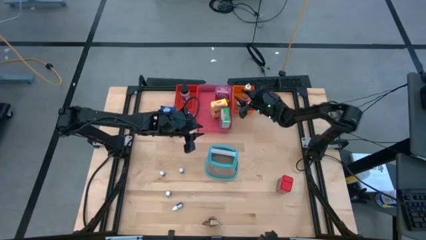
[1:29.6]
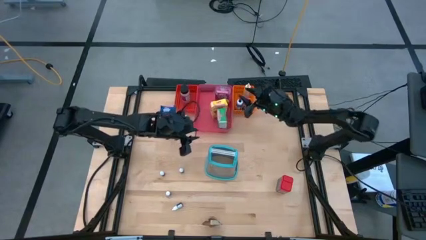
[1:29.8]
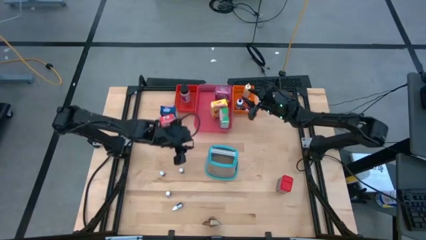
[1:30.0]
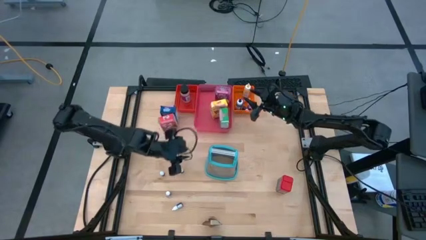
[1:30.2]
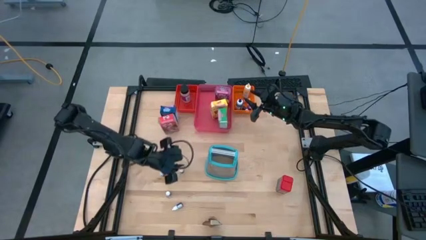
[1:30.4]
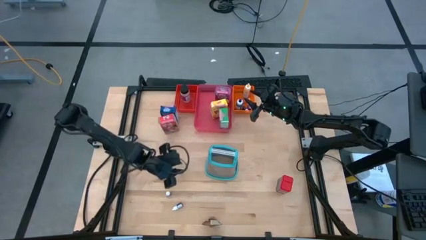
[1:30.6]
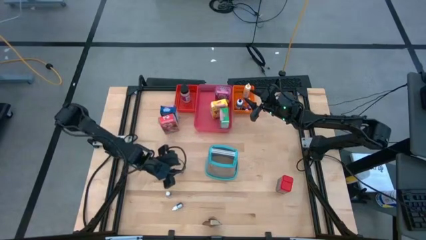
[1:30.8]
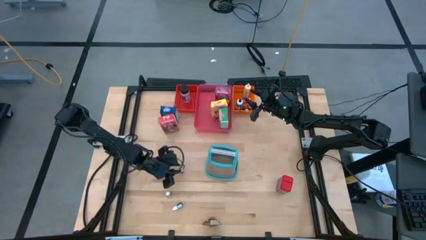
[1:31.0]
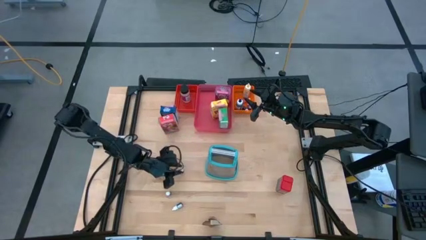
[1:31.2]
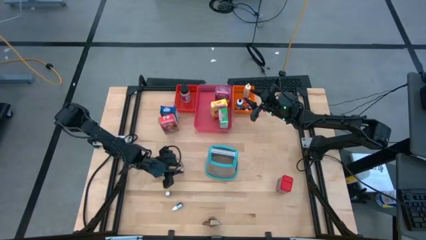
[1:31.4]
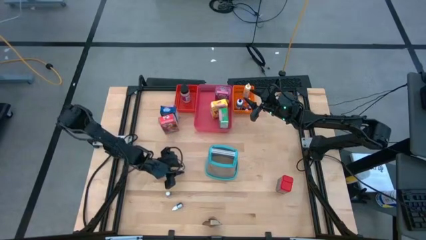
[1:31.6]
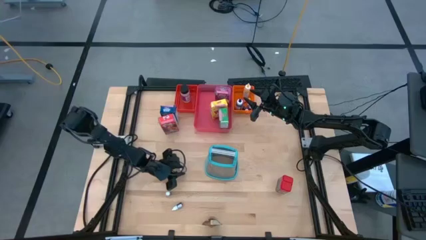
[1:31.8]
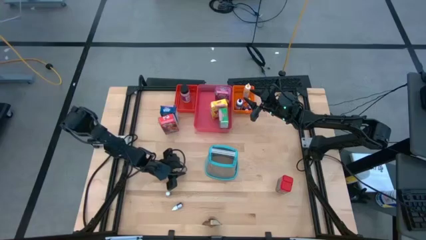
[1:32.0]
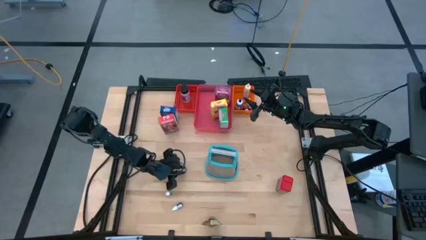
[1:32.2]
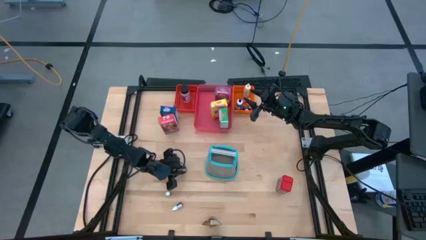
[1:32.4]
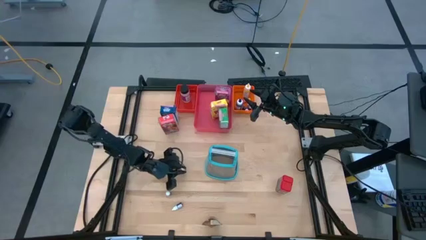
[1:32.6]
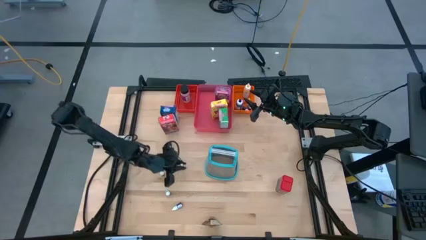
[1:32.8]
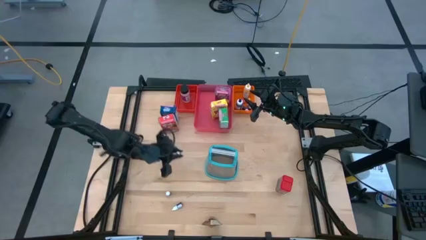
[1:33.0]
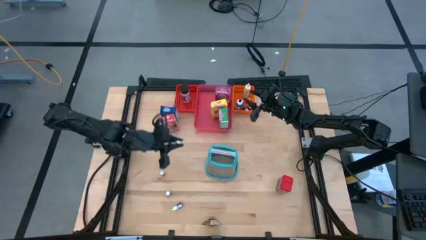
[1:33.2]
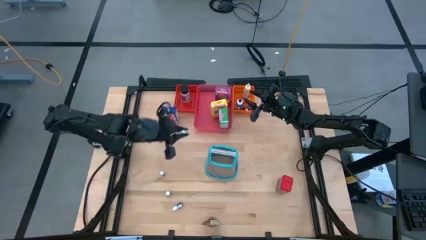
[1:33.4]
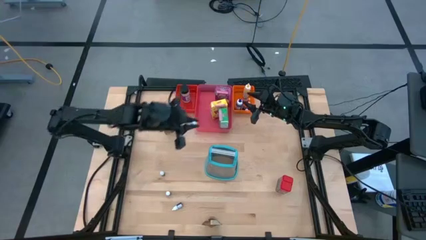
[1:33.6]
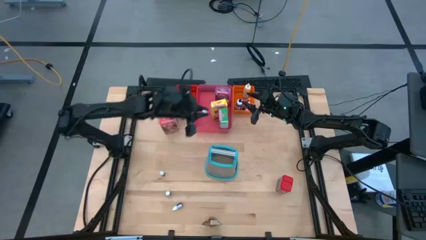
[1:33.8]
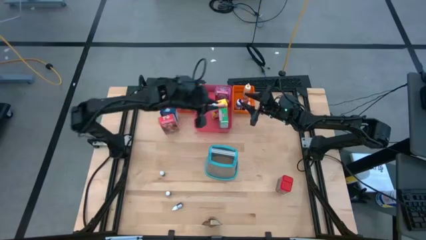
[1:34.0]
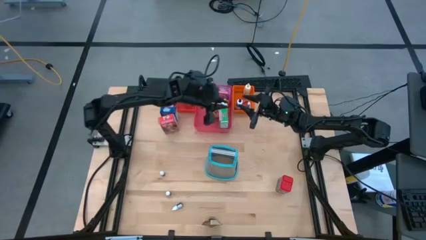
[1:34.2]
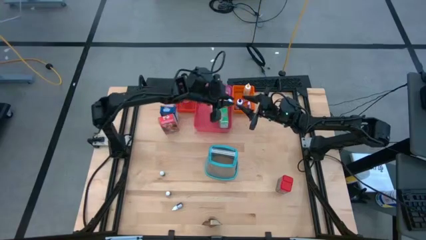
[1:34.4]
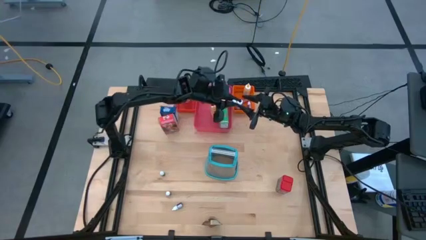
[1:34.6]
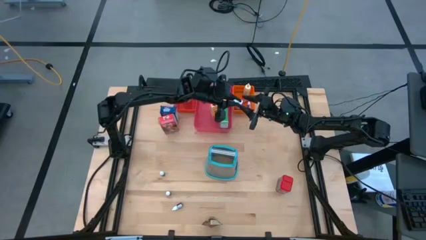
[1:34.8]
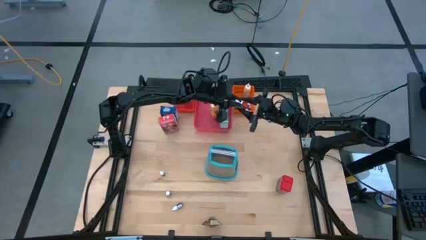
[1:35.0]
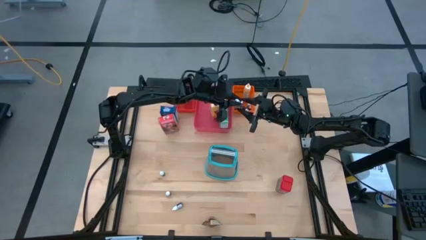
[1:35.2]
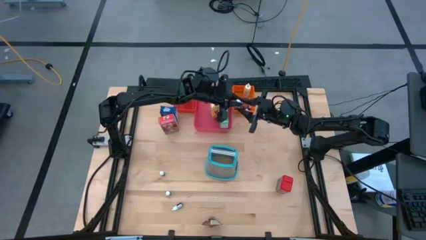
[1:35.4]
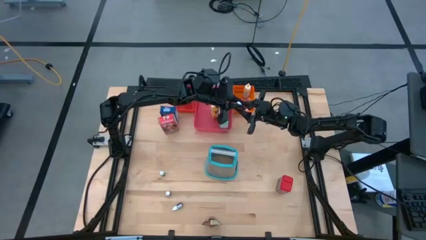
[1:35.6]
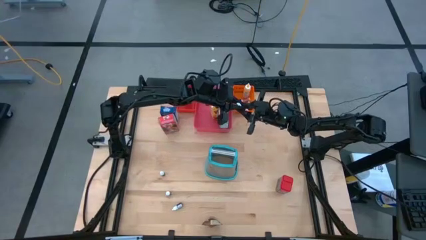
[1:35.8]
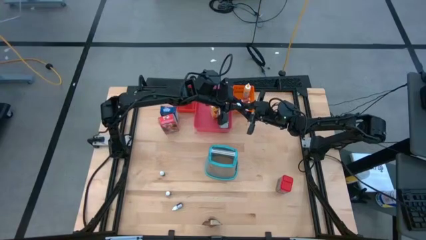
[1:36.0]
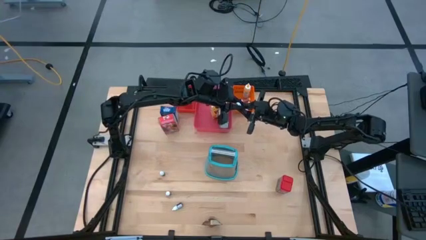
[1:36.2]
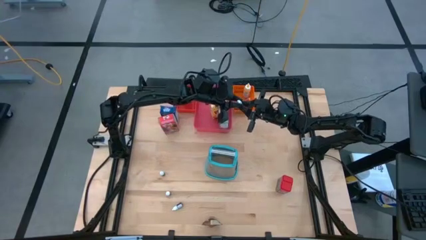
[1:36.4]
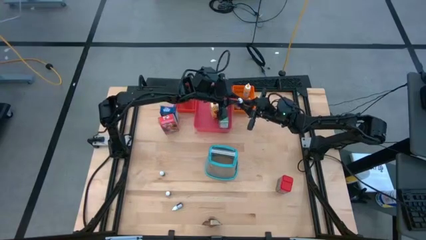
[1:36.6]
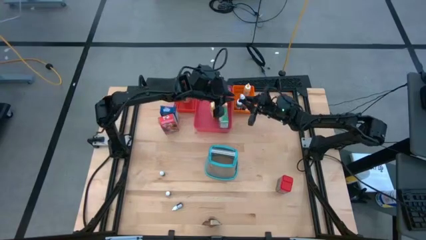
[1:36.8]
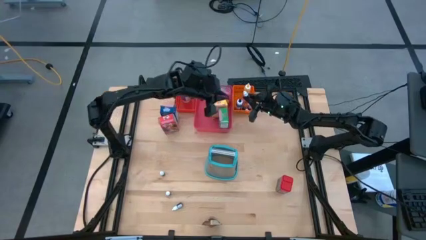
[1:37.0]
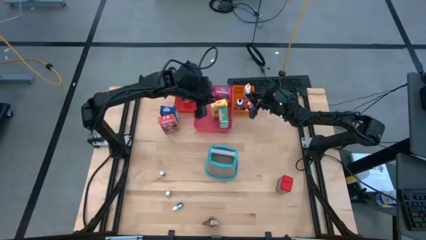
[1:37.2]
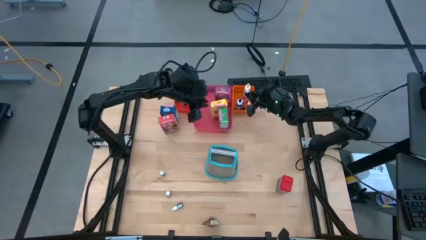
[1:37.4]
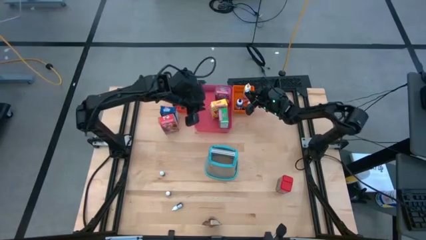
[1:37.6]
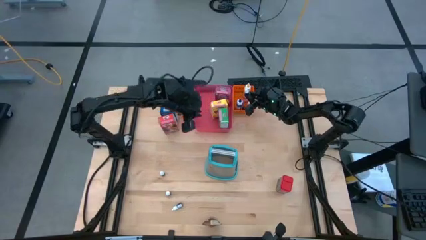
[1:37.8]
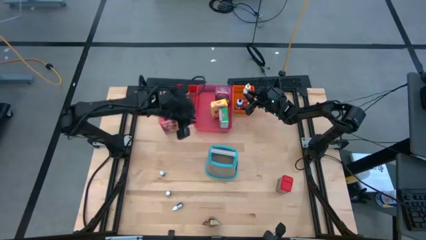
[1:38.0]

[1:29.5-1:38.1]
Task: Pick & Place Kitchen Items
Put the small green food coloring bottle into the orange bin

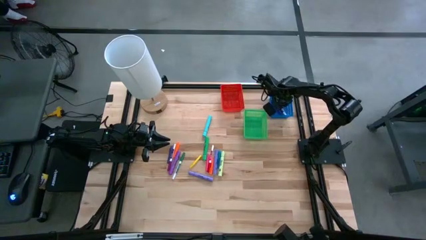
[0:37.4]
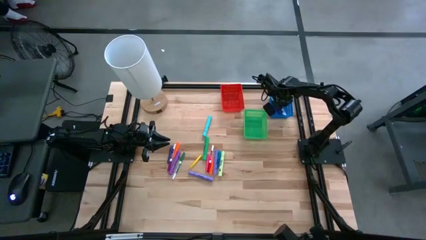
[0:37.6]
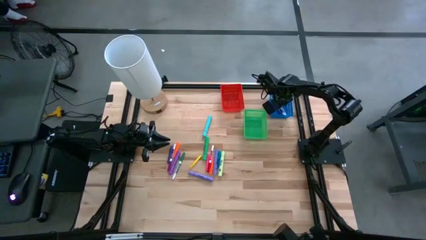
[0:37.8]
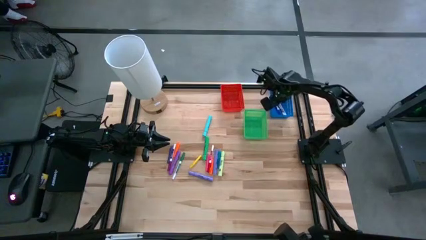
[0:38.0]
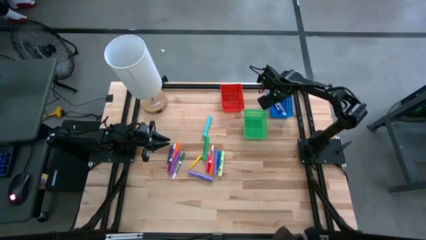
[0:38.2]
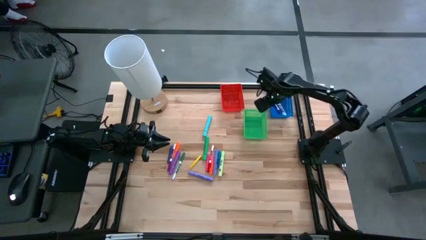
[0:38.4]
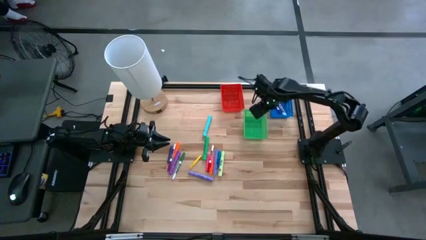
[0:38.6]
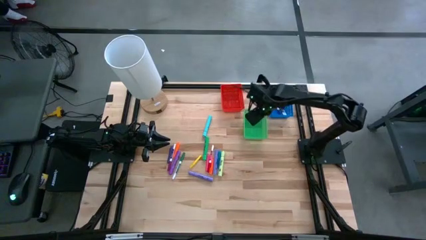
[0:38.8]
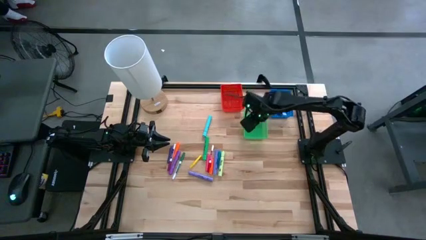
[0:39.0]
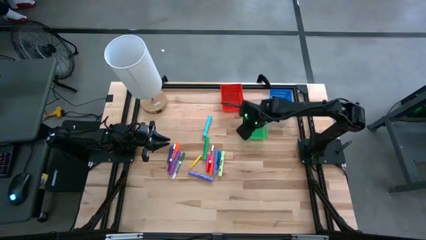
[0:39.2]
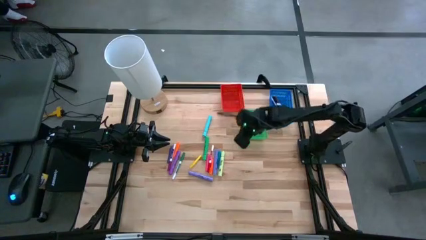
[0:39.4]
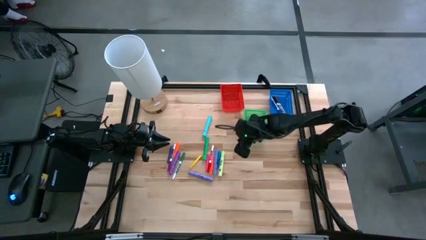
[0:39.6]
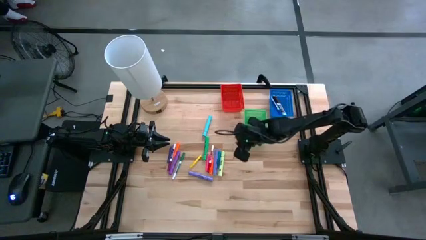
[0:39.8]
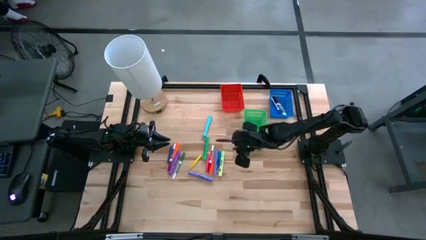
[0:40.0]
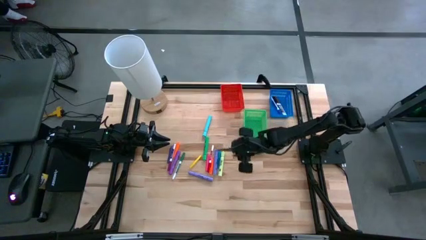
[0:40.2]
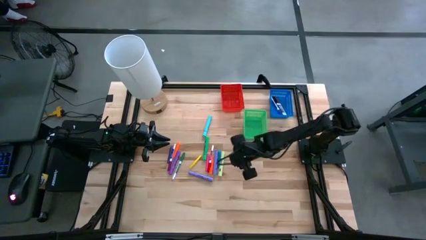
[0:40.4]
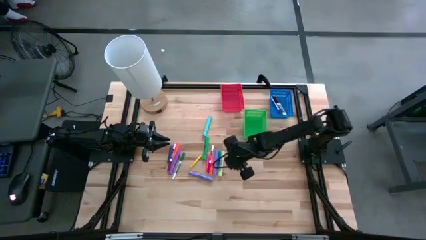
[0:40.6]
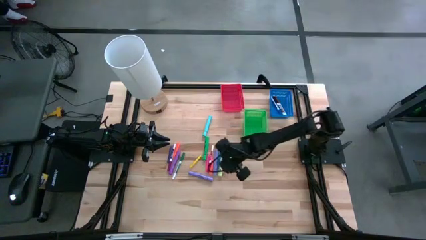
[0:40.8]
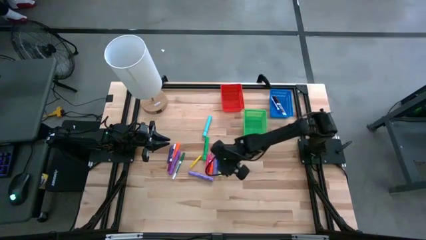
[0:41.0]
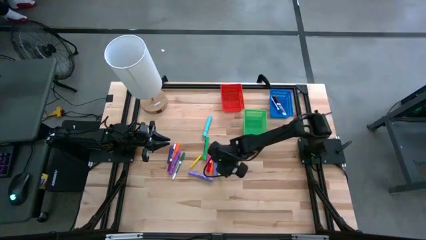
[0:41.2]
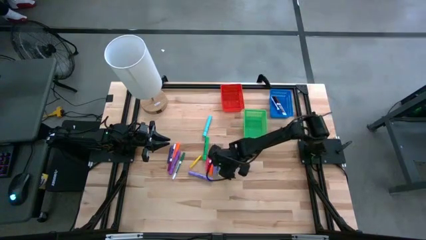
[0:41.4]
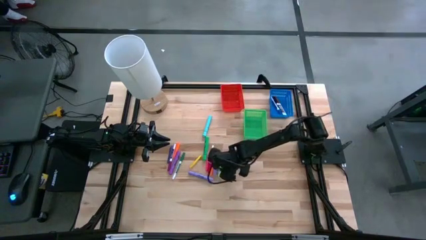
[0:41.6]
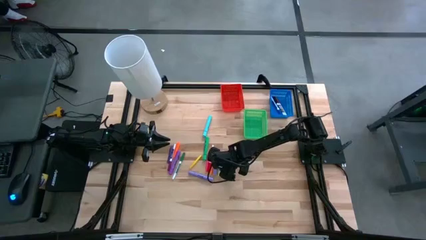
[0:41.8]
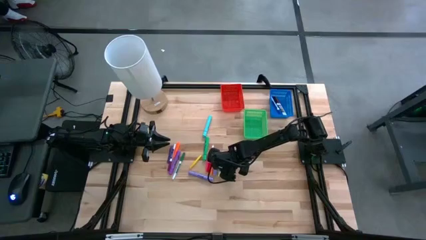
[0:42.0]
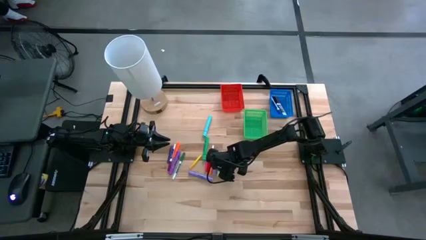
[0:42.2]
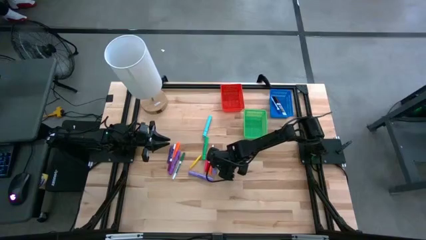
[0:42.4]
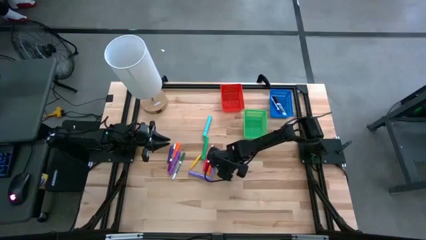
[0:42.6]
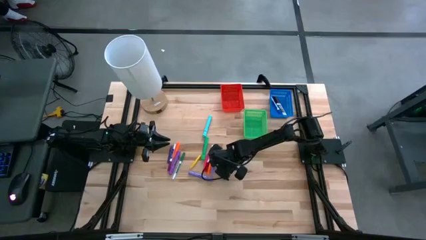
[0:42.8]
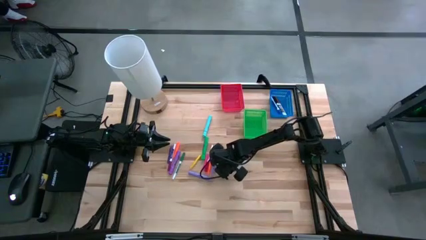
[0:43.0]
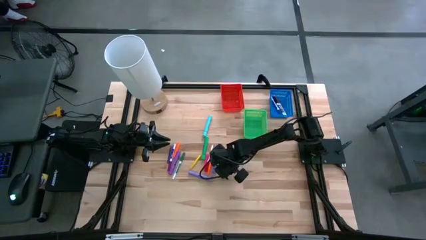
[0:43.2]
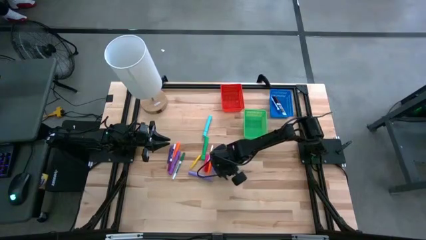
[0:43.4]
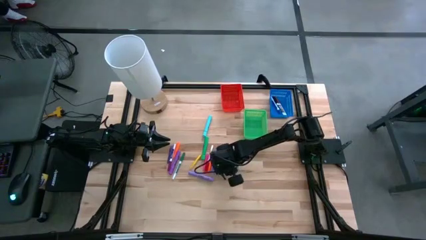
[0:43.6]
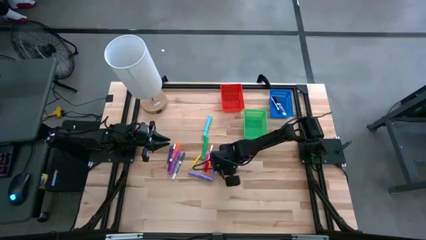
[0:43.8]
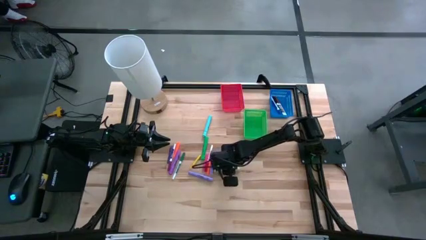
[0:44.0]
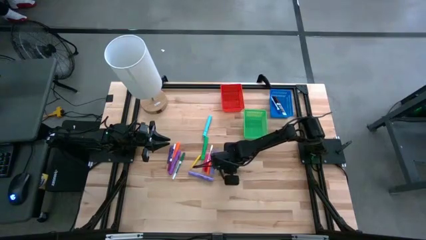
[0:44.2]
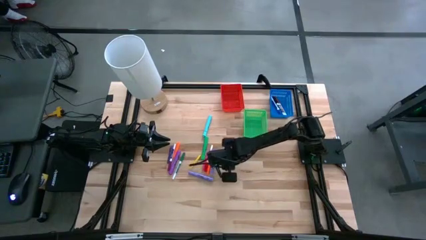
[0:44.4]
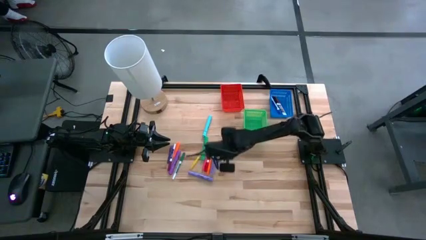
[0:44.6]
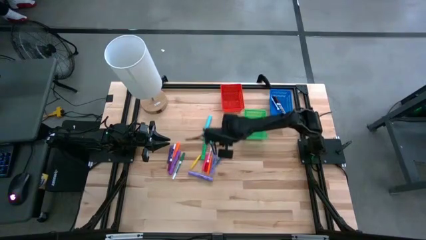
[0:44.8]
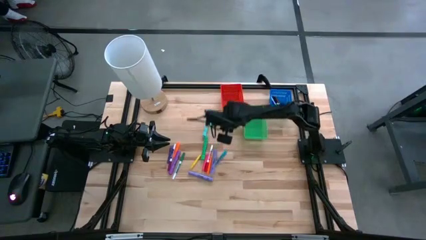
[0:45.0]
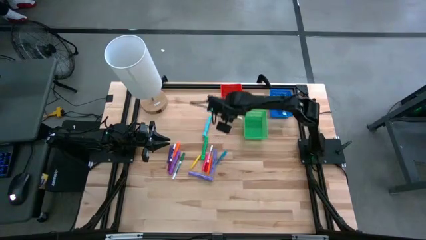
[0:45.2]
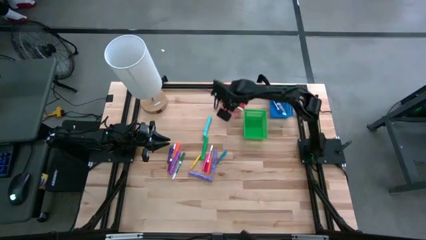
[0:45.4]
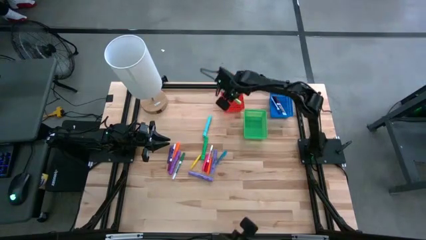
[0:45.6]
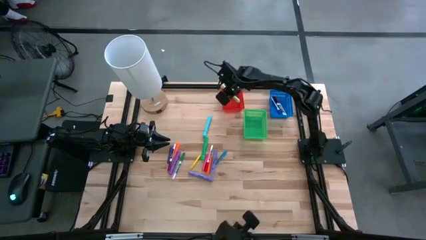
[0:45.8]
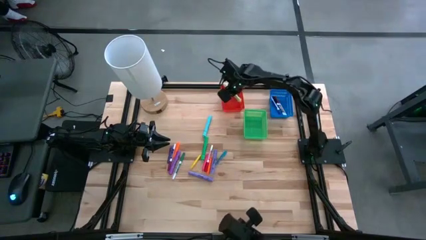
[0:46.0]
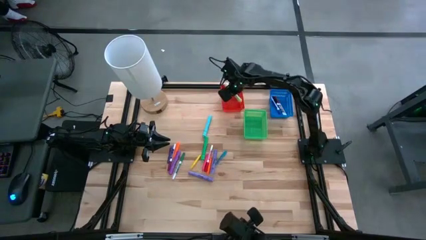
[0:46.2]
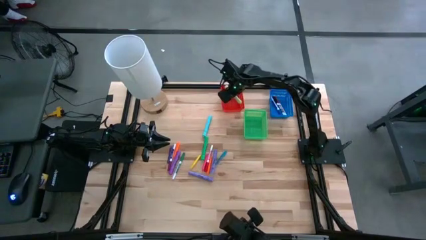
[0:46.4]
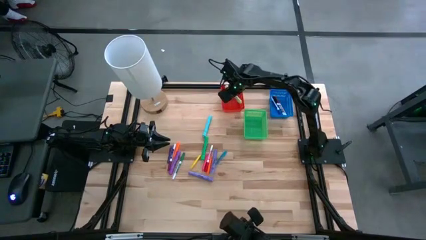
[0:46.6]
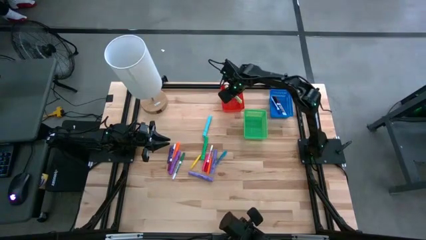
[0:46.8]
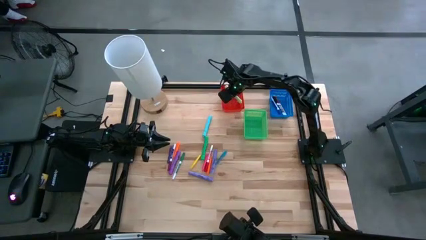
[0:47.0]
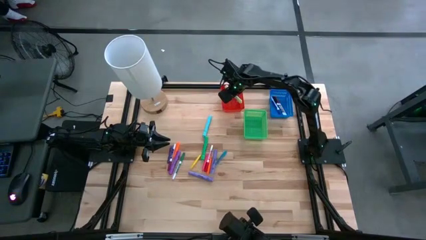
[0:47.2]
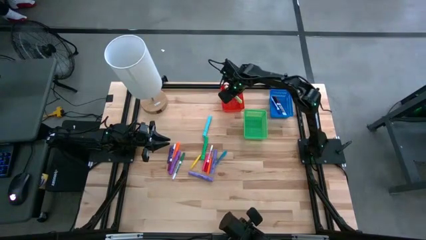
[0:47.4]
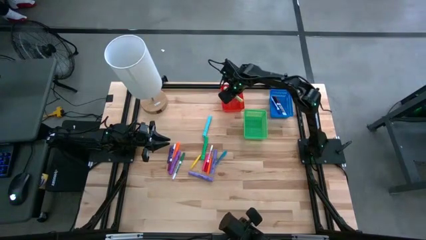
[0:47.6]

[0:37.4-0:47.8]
Task: Pick & Place Markers
Put the light green highlighter in the red bin
